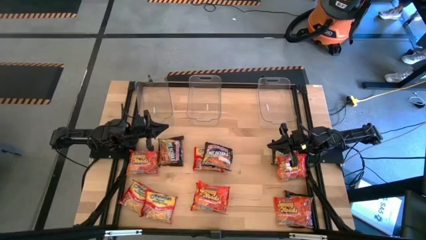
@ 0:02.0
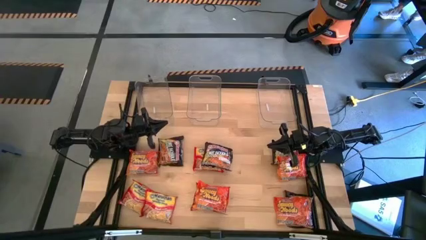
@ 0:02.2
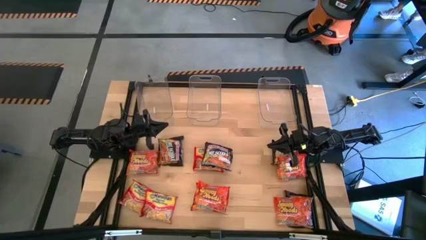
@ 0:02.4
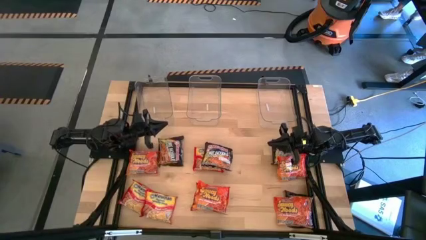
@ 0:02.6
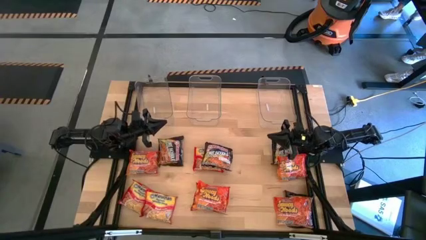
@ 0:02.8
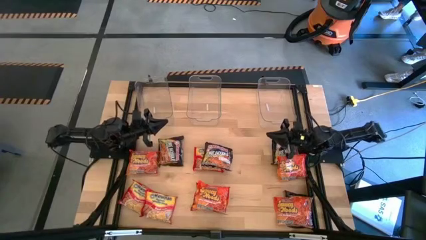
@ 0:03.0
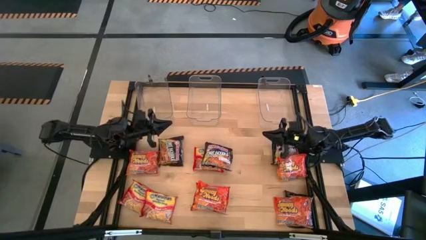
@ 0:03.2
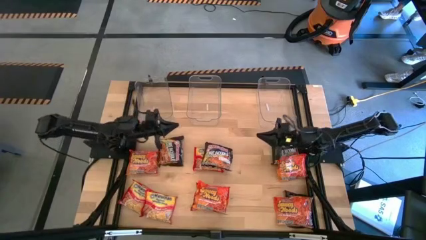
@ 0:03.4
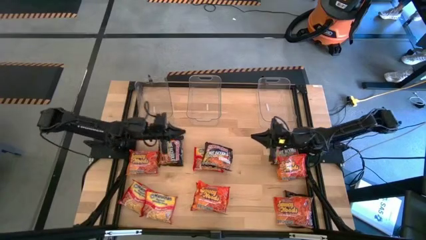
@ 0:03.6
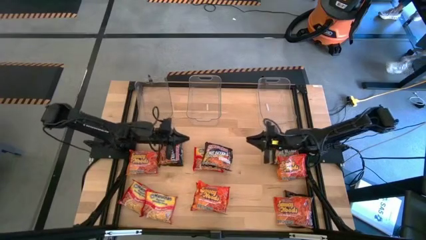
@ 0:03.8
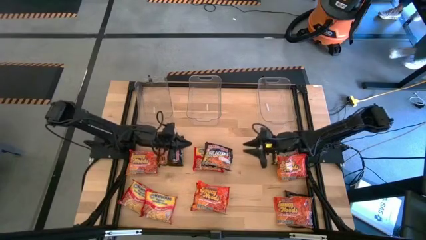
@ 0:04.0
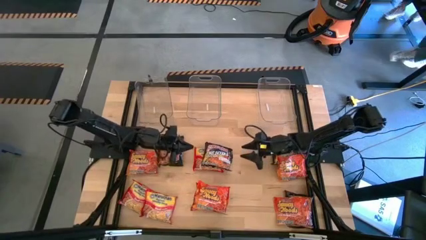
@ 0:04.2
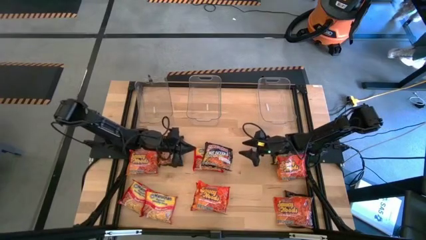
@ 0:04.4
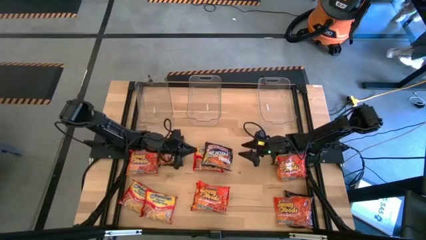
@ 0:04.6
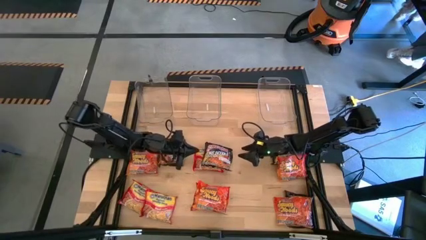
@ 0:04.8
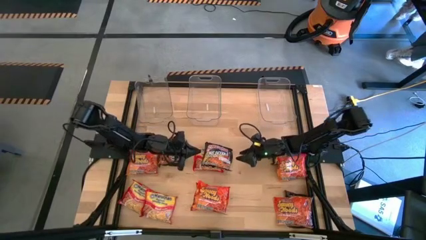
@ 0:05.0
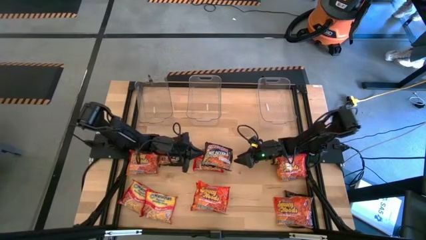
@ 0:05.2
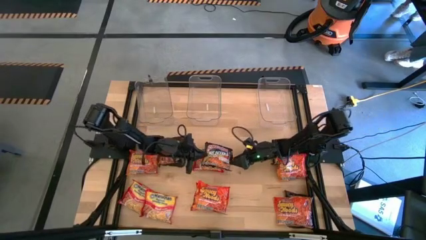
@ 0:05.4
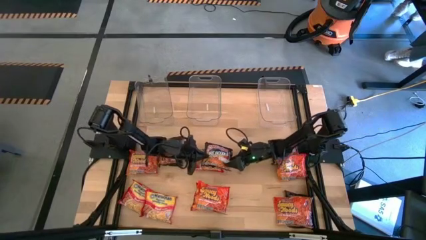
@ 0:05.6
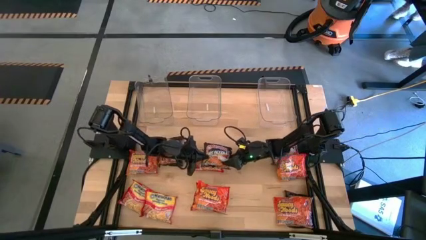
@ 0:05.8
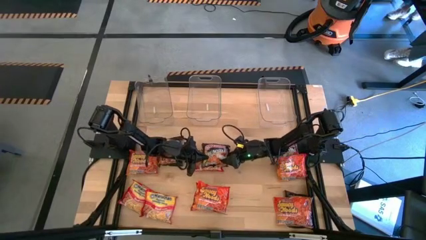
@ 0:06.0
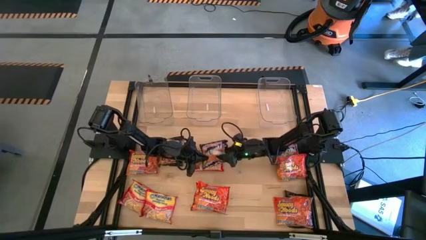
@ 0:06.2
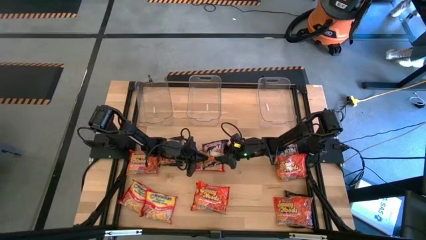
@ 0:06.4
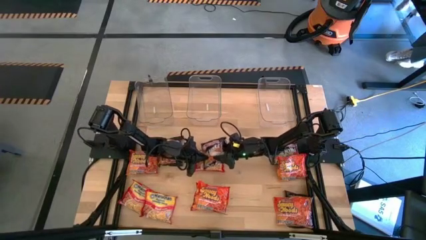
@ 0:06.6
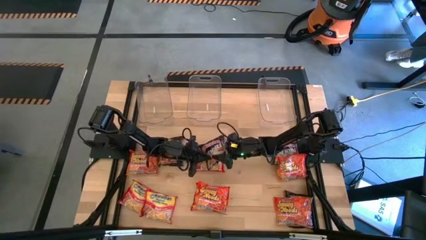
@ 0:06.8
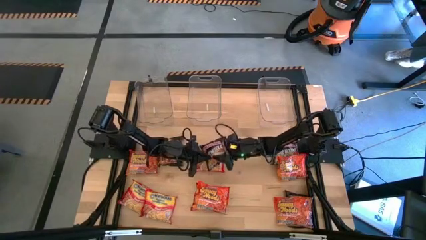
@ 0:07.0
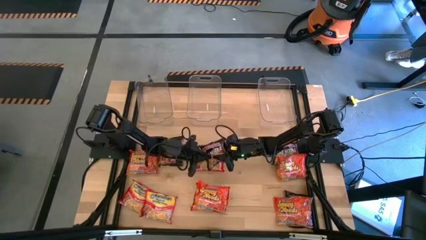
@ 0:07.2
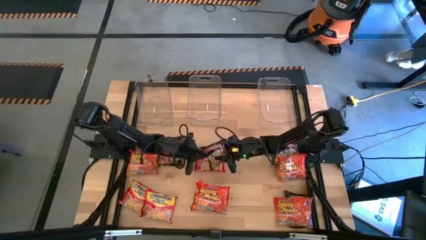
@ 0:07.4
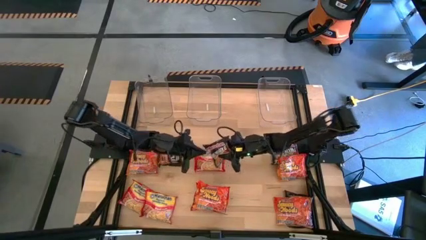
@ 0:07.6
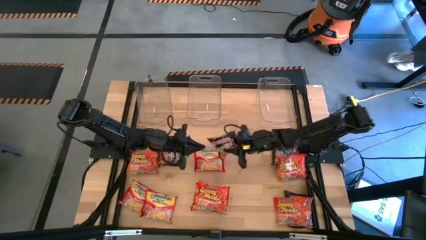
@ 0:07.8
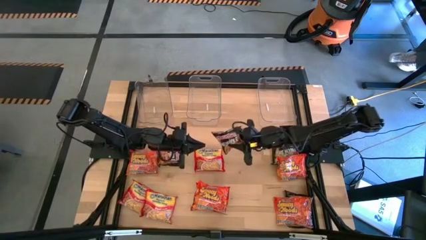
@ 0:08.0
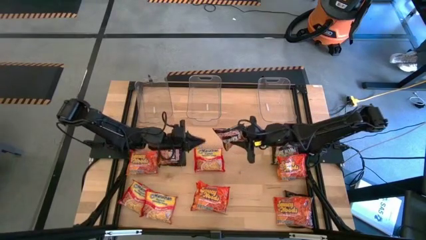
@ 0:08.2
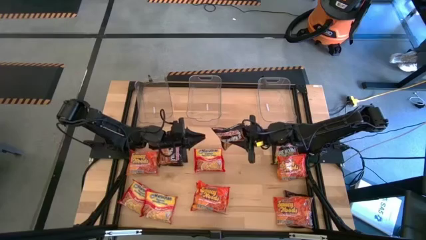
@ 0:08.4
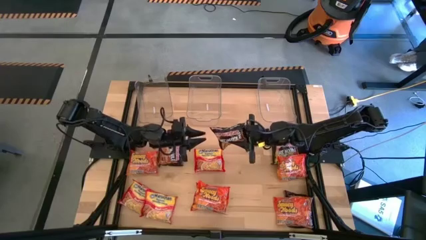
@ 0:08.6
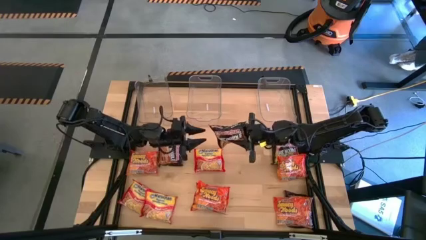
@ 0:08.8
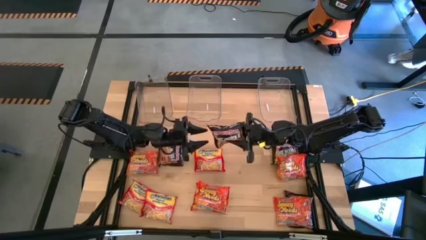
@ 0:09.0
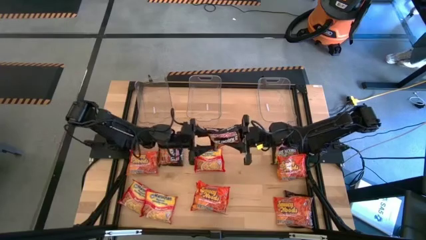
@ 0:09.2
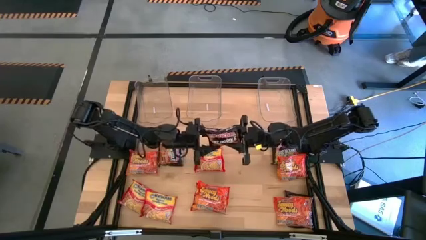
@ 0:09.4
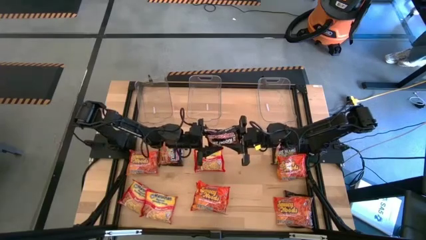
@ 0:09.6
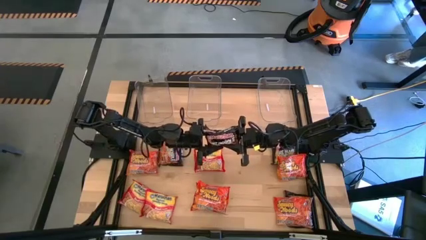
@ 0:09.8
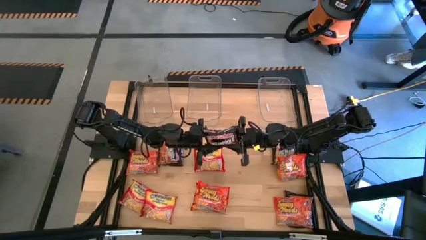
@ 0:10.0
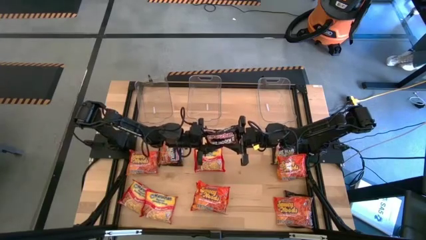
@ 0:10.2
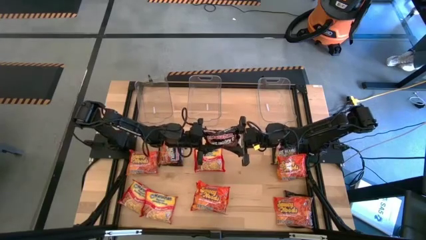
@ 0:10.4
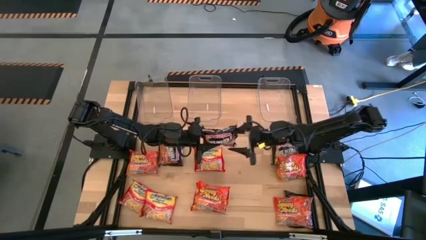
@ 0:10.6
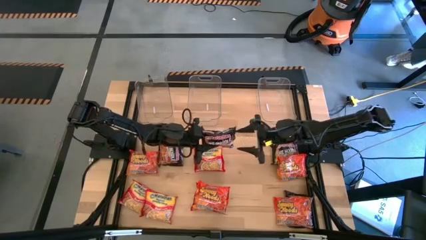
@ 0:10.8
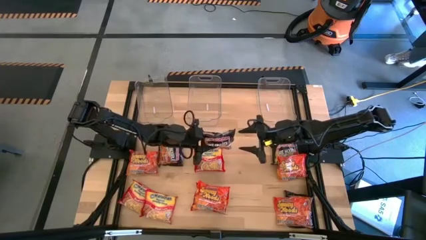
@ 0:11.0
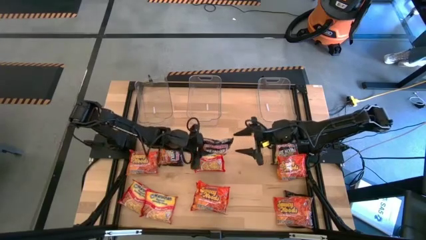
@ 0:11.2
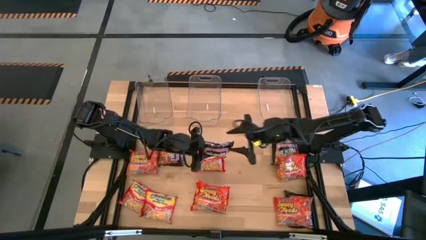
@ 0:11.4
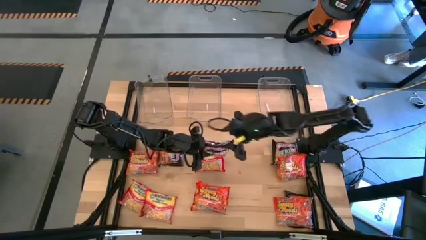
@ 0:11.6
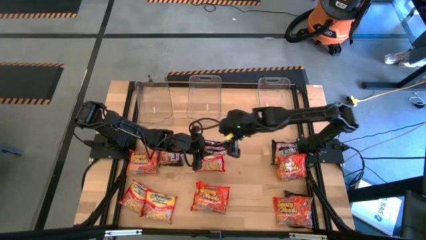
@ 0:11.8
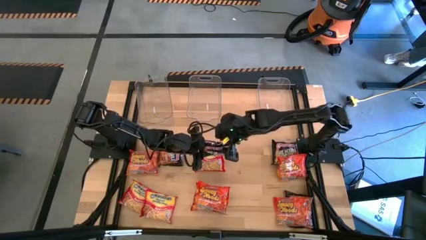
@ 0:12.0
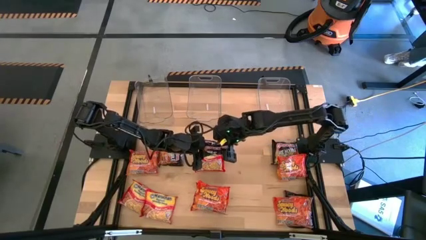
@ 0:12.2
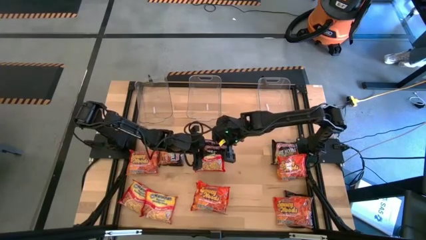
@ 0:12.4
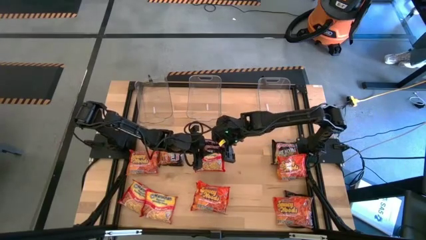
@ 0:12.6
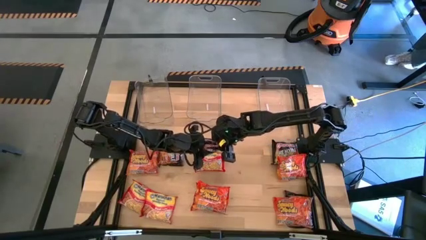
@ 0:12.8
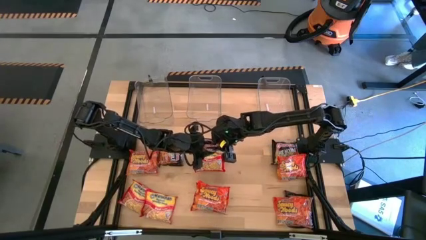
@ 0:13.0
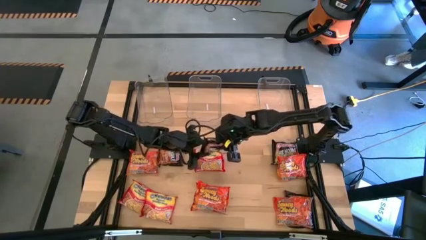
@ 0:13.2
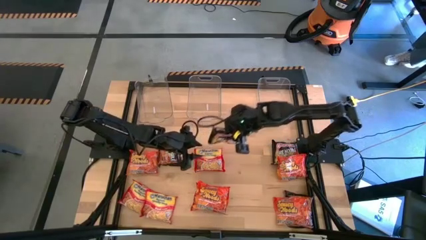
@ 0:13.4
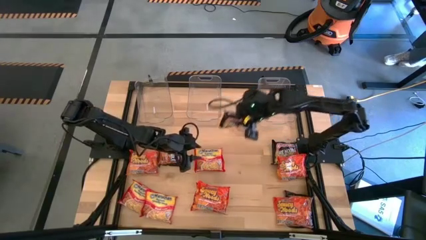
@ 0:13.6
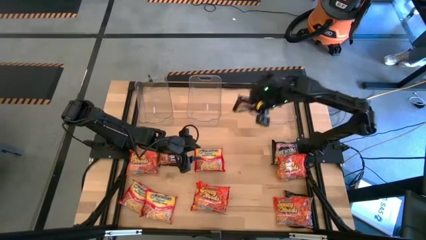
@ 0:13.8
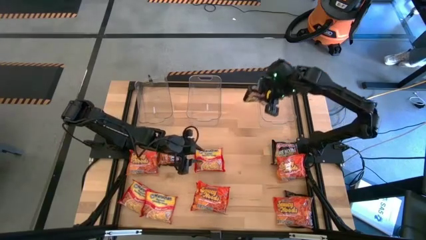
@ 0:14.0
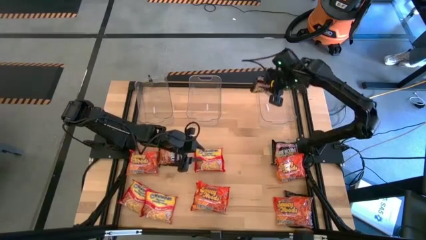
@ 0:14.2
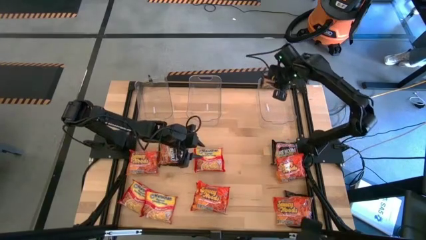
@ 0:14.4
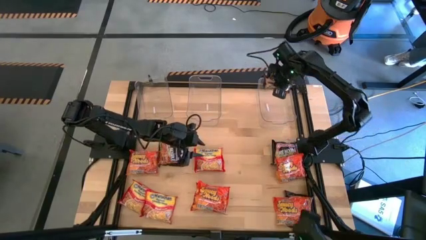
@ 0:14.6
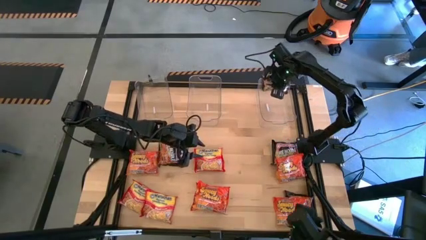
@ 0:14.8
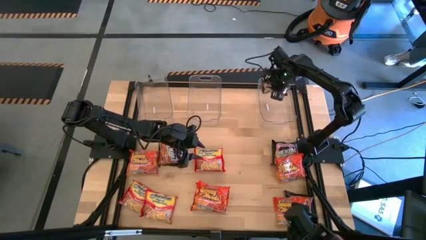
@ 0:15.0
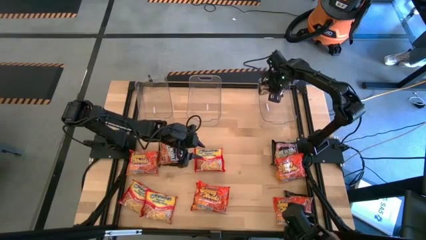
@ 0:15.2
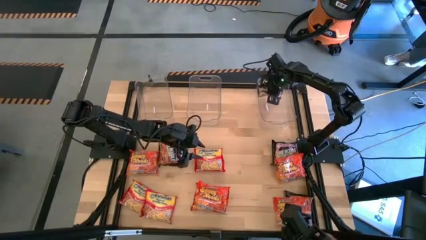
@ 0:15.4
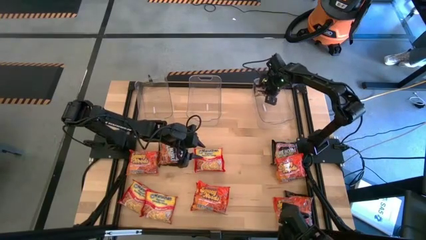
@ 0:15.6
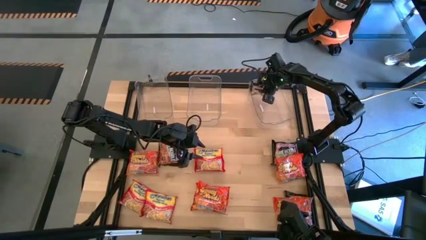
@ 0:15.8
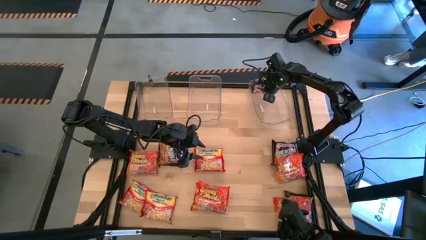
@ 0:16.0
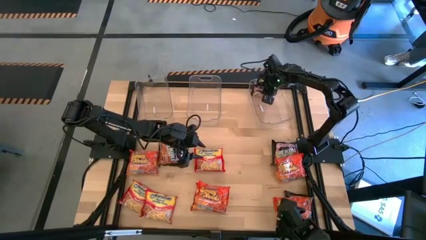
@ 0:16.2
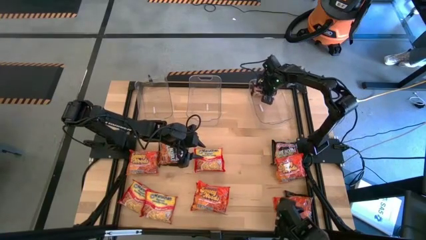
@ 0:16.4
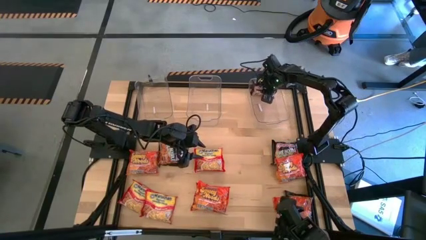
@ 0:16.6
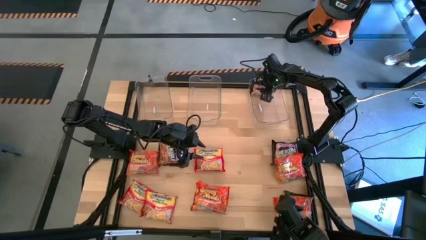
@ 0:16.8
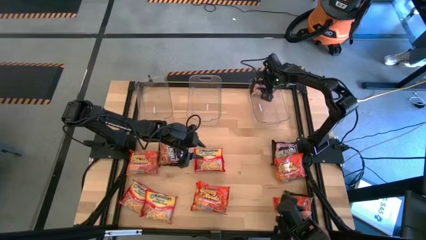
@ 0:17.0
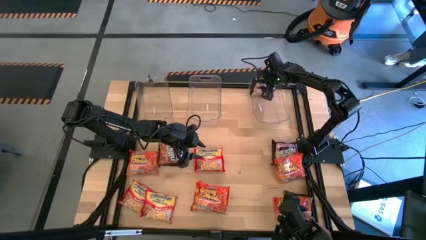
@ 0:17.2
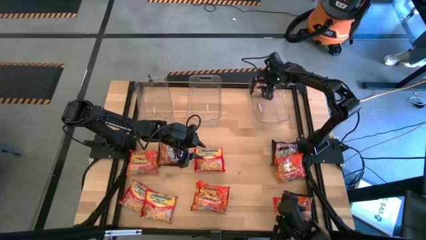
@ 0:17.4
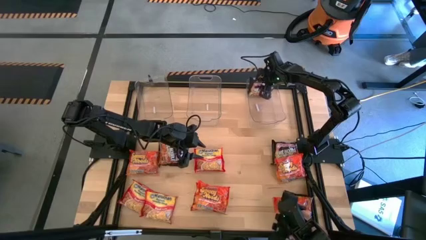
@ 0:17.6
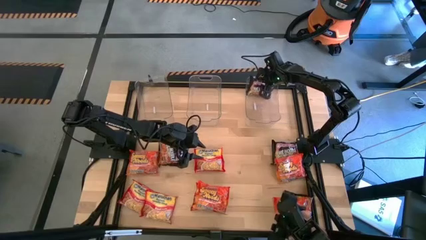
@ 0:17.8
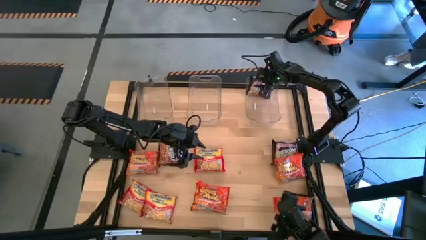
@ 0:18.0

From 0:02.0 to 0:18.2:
Task: Sort Maruchan noodles
Put the black noodle pack into the right transparent bin
